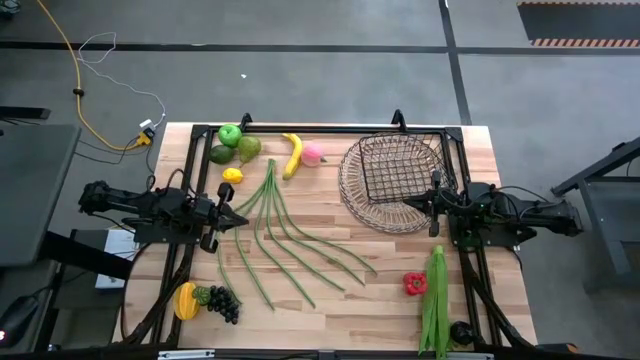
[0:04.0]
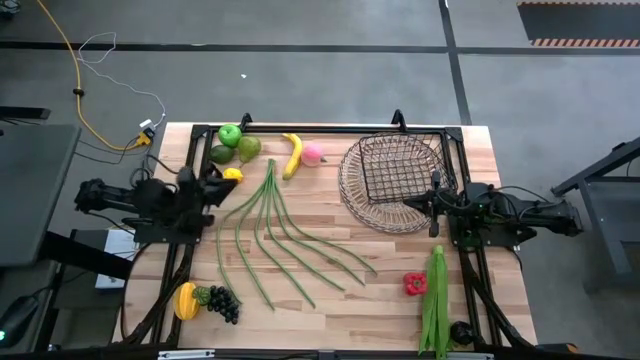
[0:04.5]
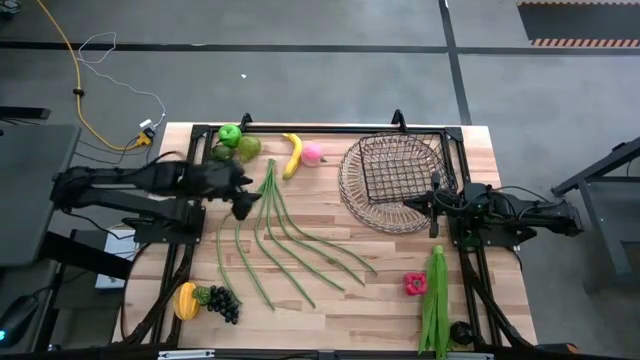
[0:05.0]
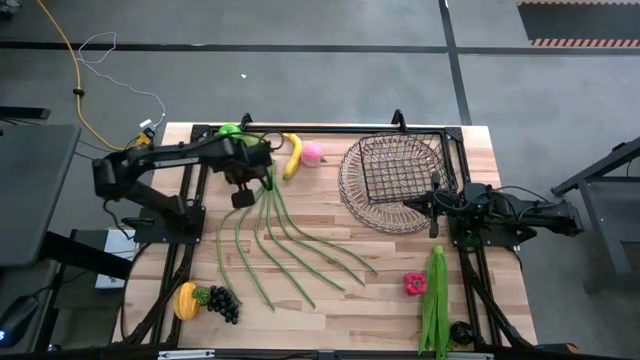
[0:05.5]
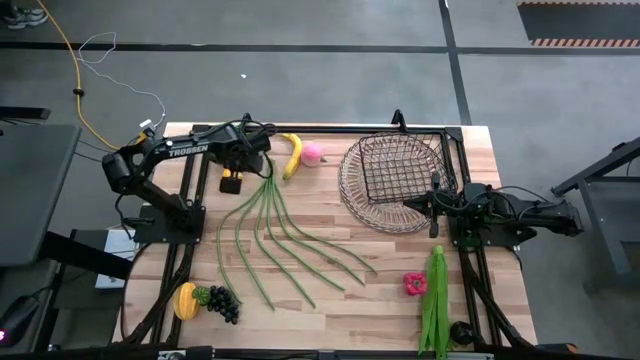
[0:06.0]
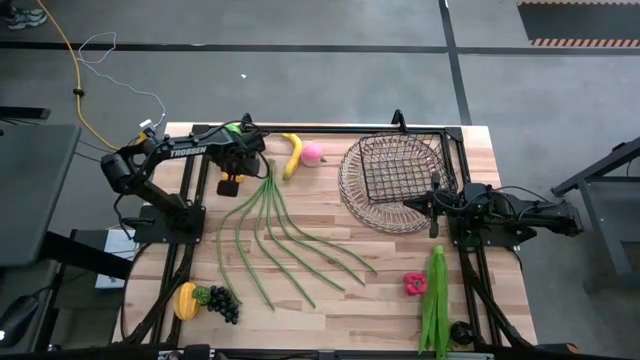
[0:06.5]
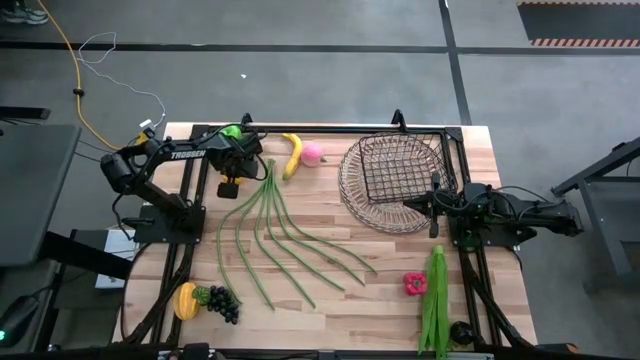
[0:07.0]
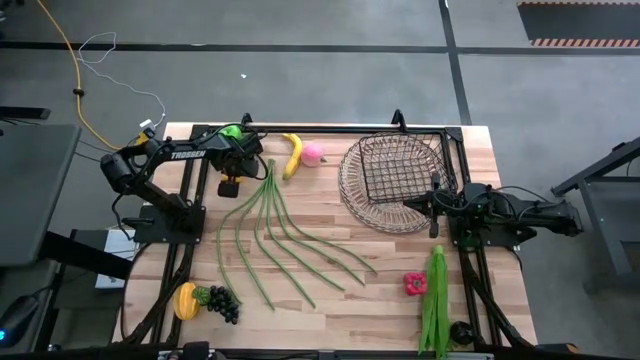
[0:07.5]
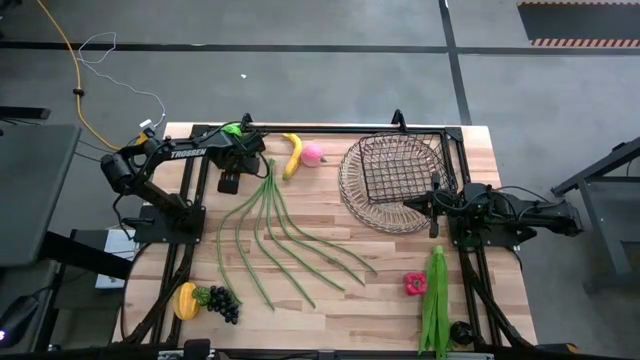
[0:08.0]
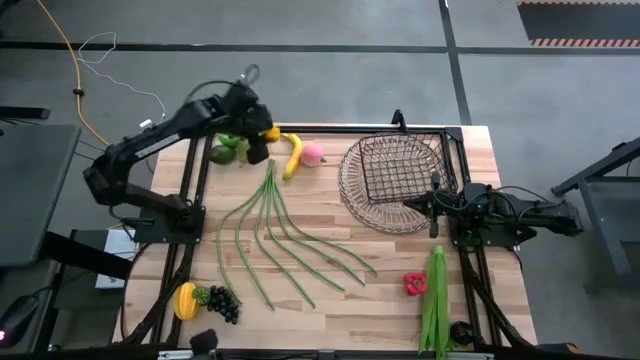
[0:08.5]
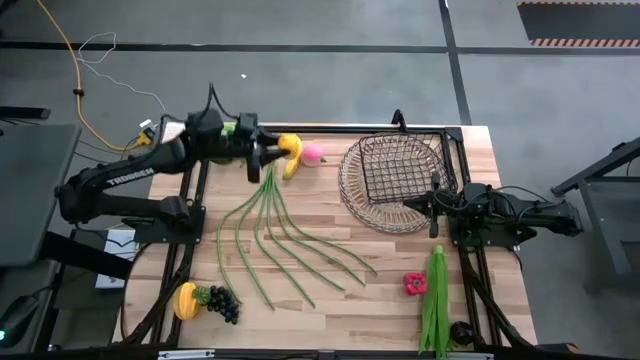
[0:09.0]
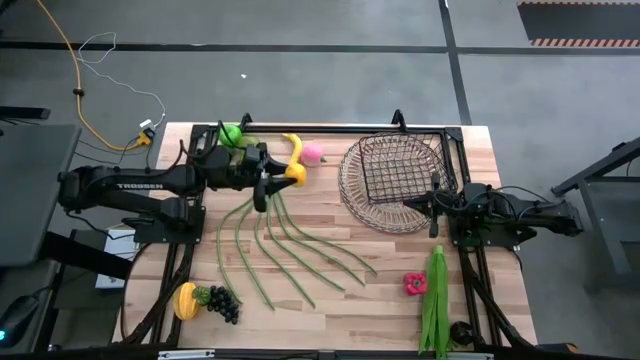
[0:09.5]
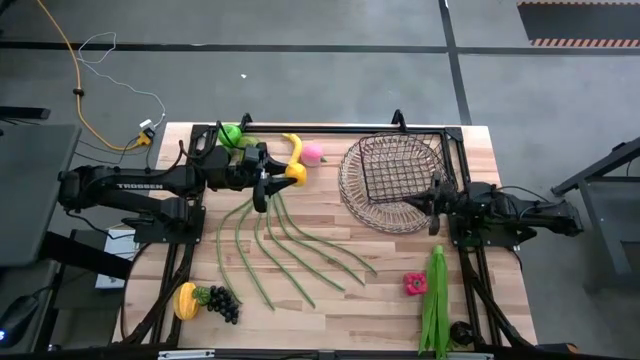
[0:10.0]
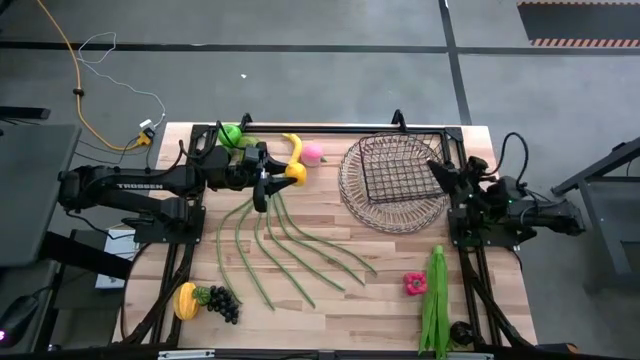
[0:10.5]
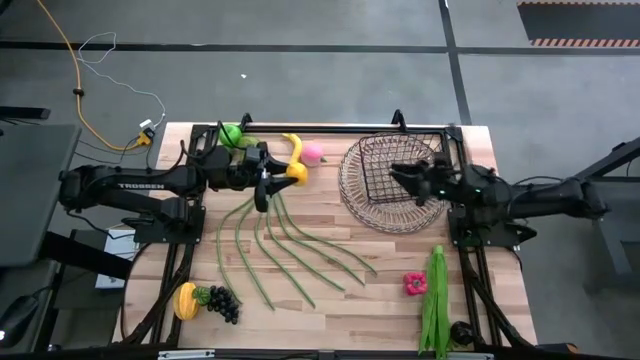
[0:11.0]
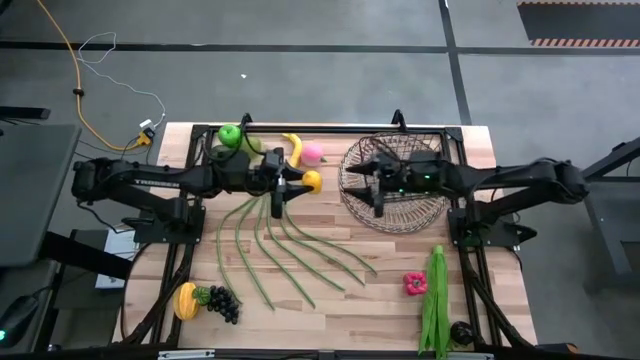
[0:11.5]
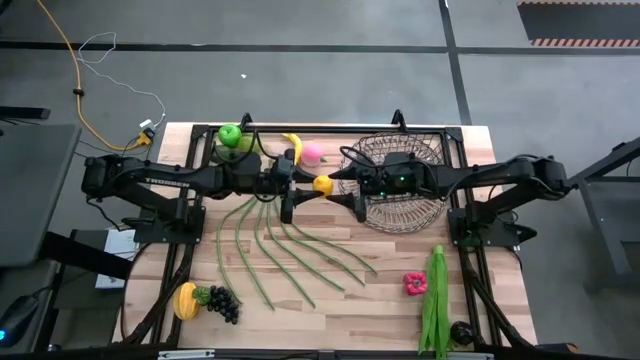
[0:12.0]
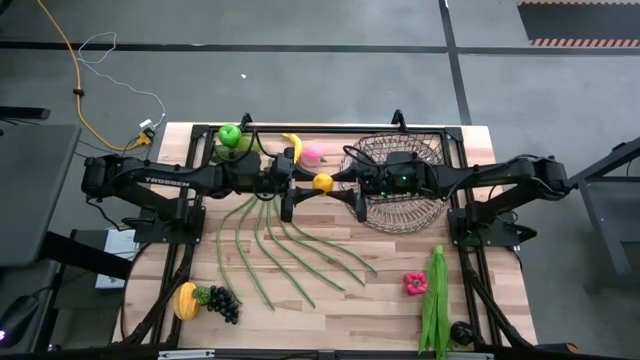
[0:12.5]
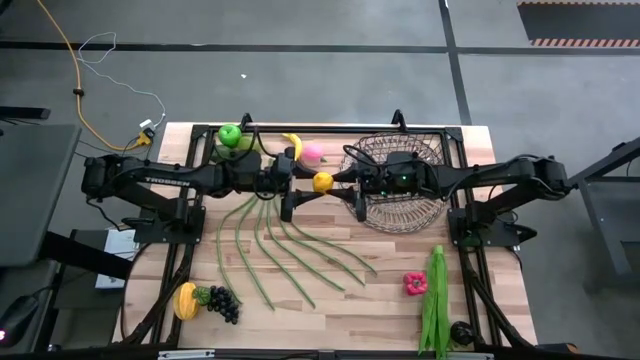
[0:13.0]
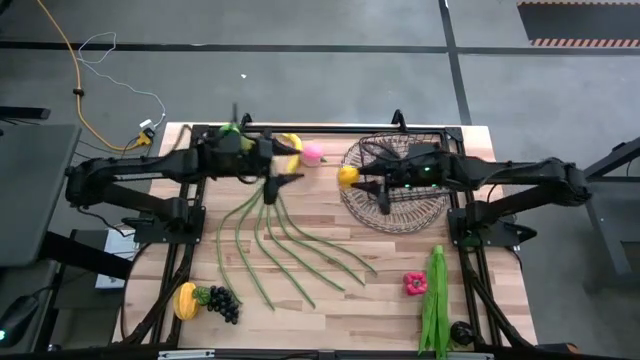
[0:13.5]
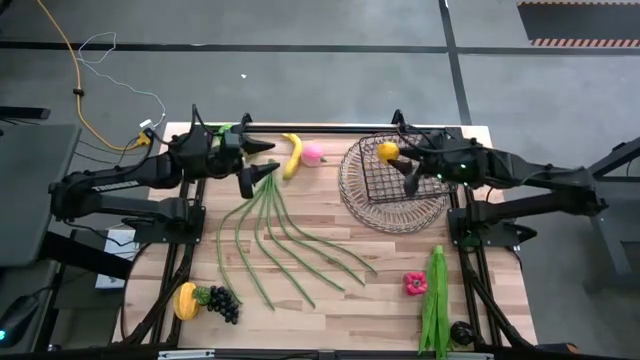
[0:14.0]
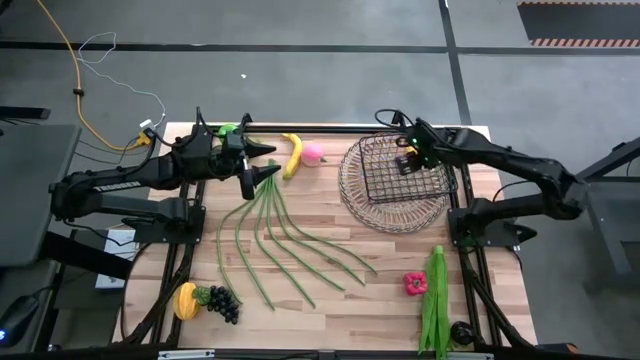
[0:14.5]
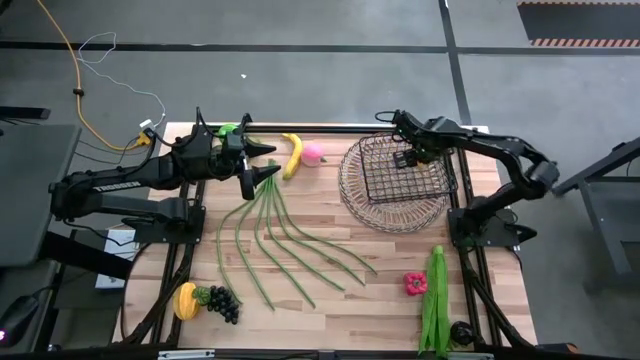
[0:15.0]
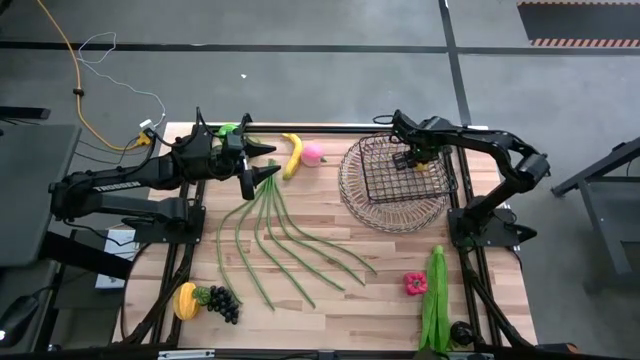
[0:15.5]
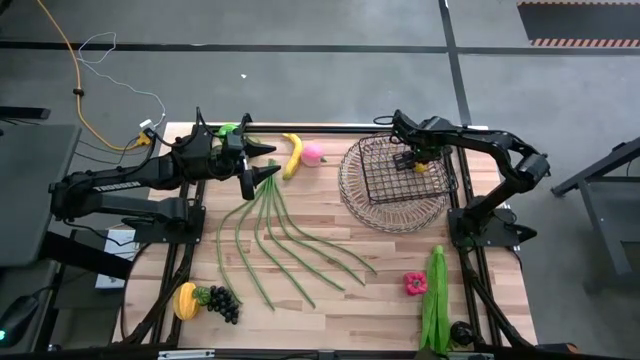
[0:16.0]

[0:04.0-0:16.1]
Task: Build produce basket
Put the yellow lemon into the wire basket

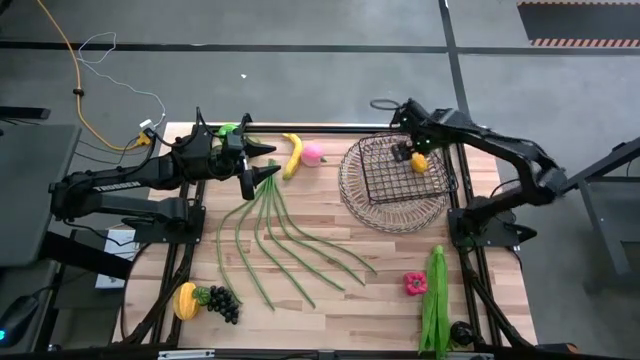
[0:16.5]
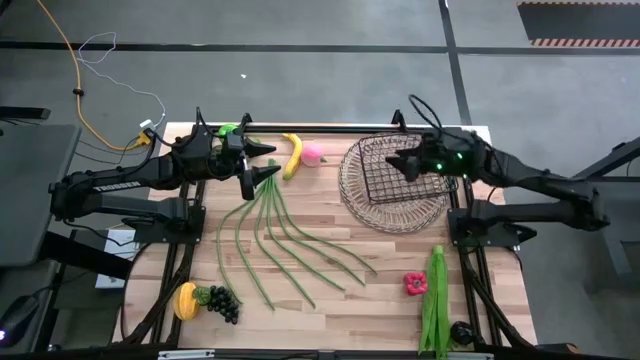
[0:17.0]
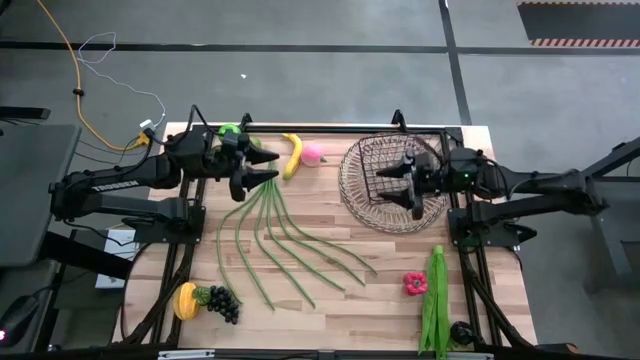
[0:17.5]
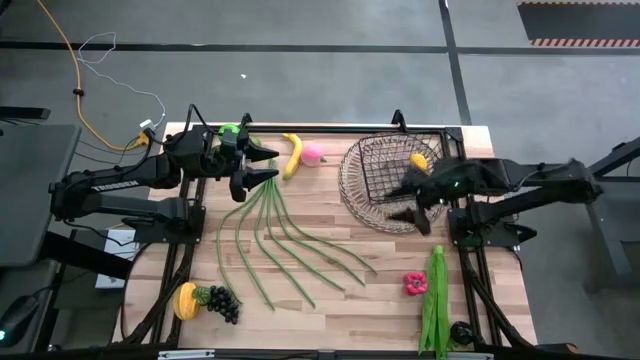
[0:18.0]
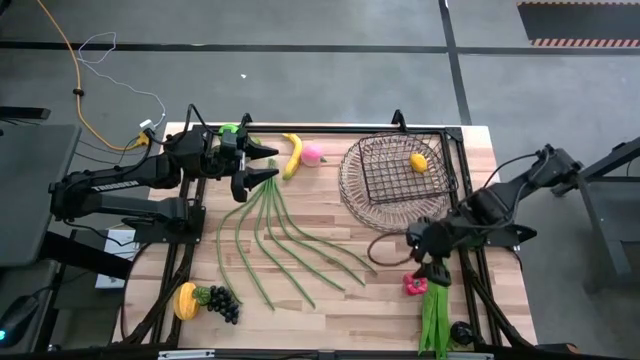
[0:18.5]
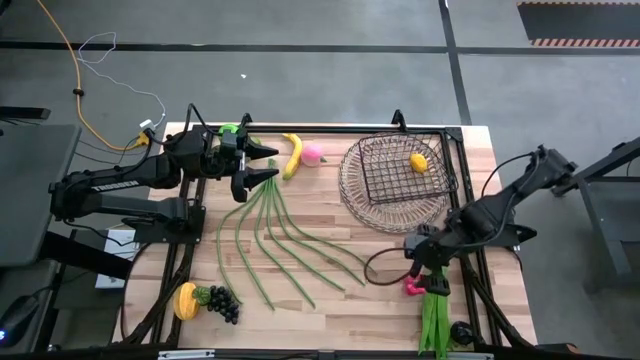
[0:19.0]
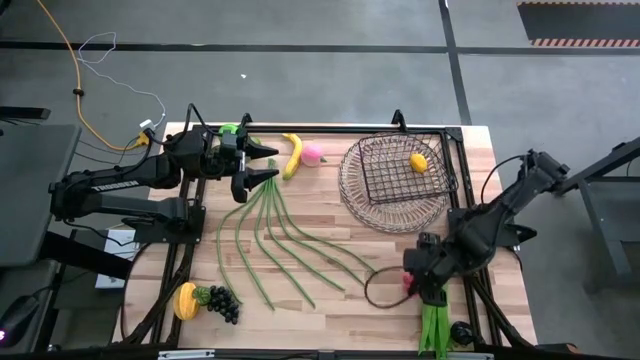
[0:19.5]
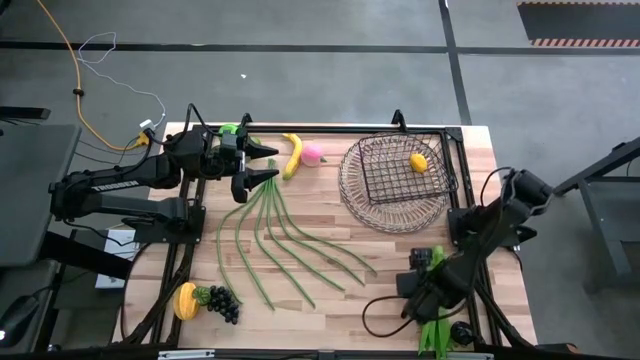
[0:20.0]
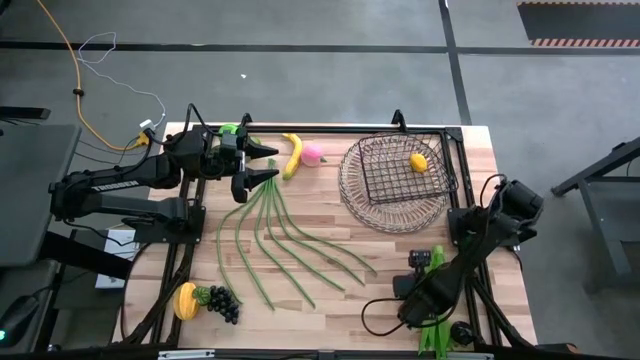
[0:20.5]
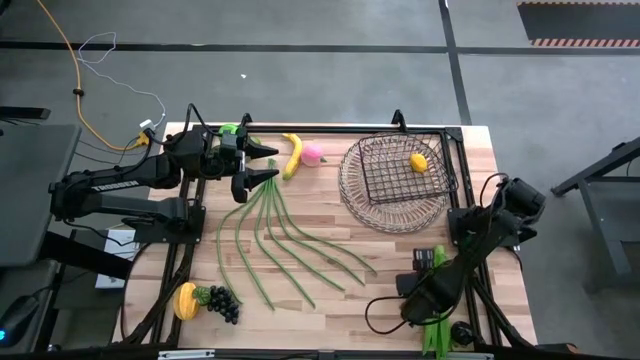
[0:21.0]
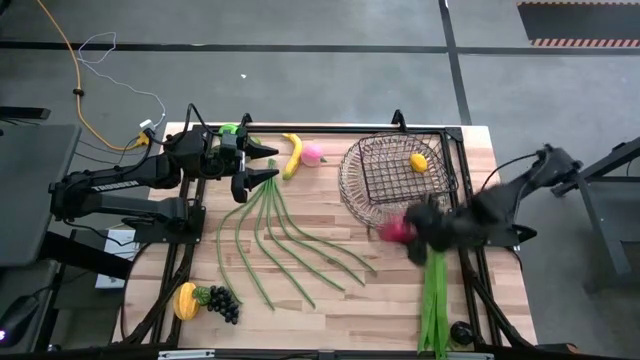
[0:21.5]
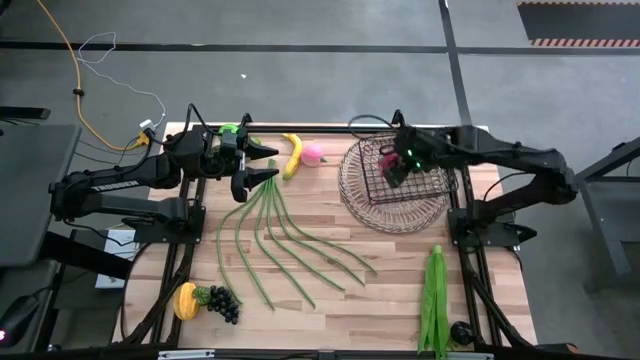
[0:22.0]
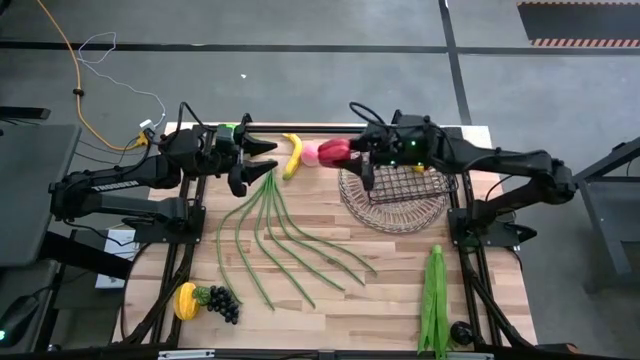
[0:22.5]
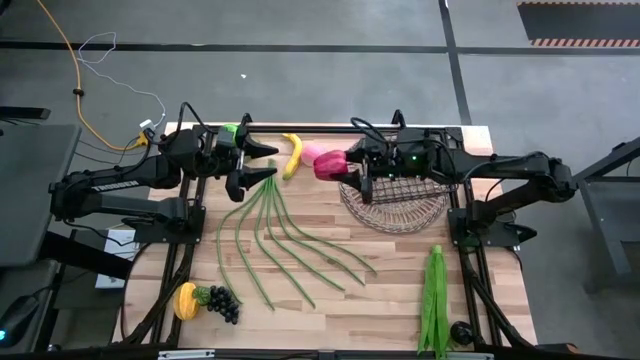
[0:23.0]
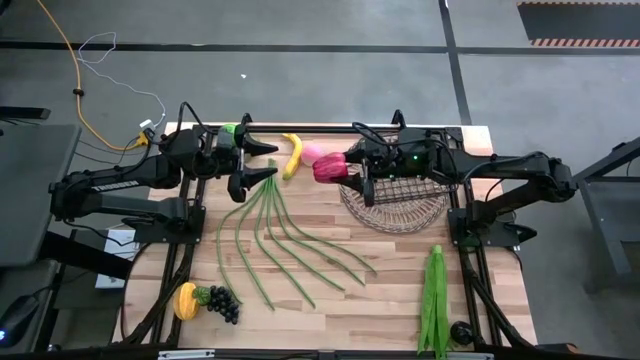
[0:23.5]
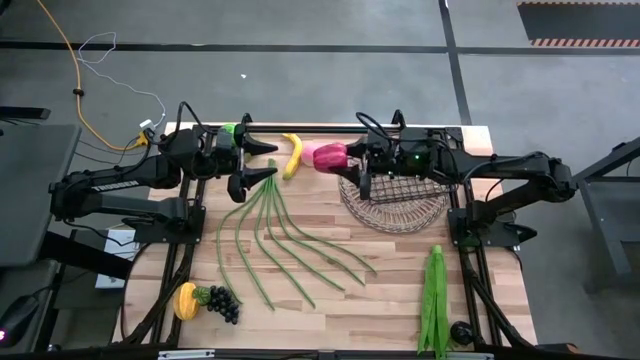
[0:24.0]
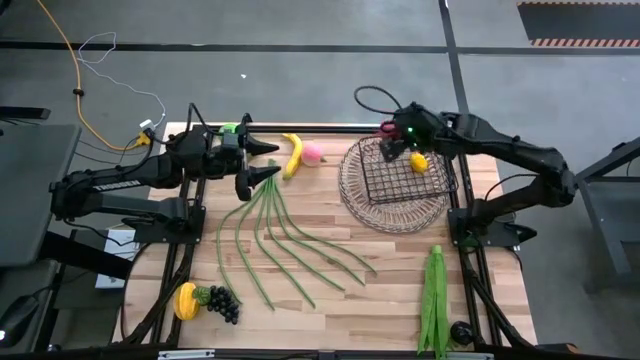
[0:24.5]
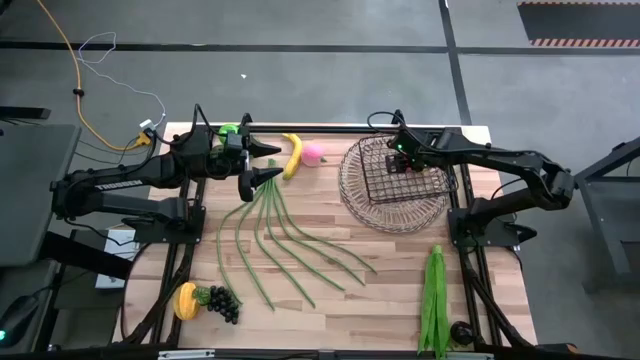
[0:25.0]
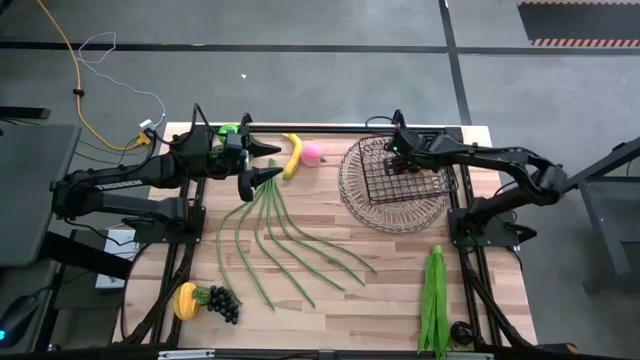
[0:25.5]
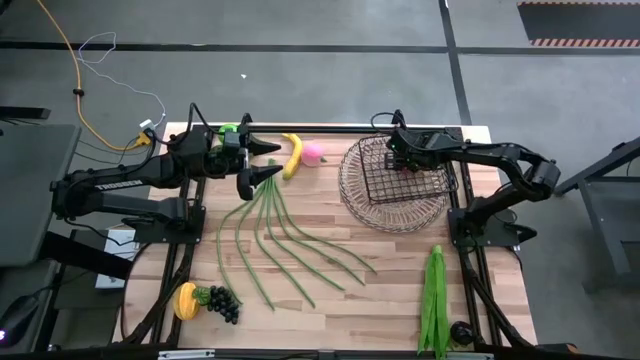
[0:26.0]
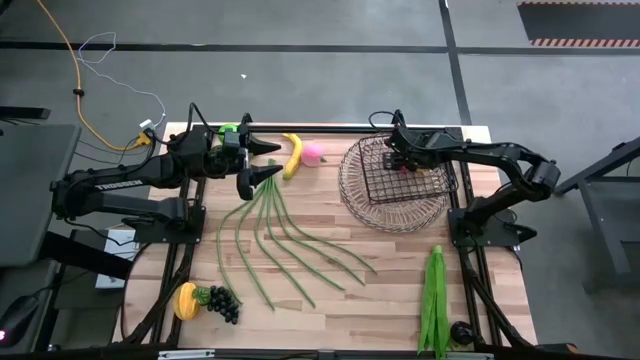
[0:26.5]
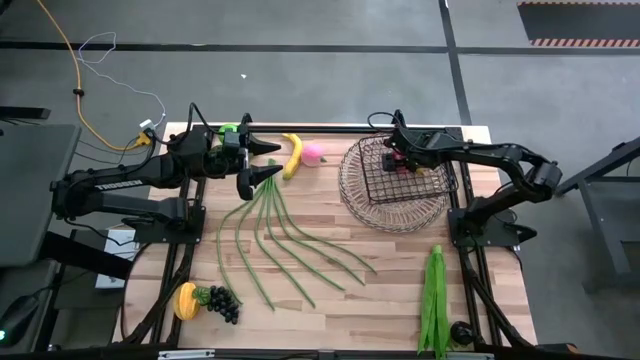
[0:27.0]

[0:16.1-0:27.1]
Put the red bell pepper into the wire basket
